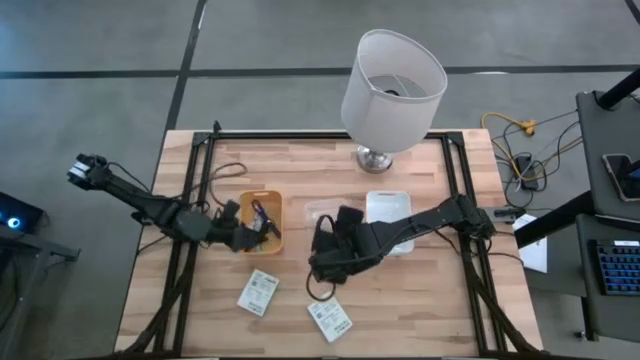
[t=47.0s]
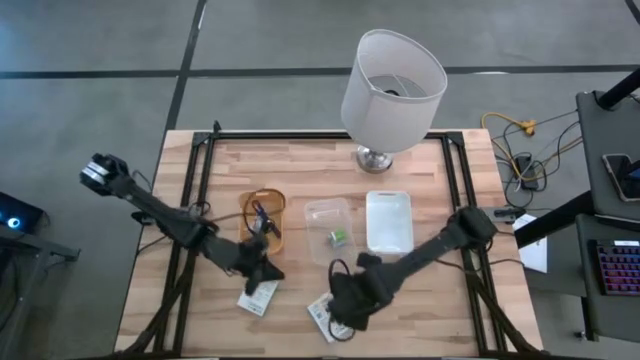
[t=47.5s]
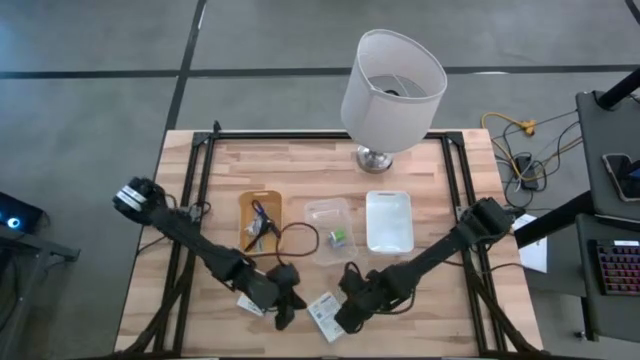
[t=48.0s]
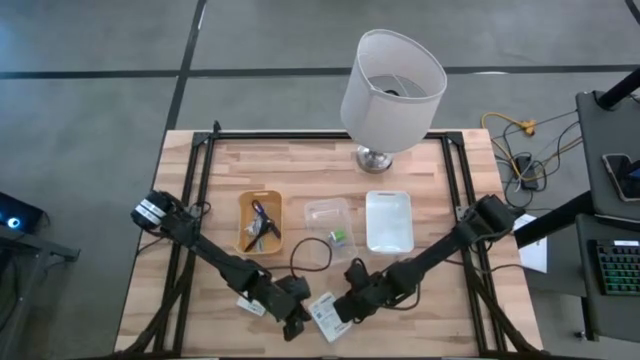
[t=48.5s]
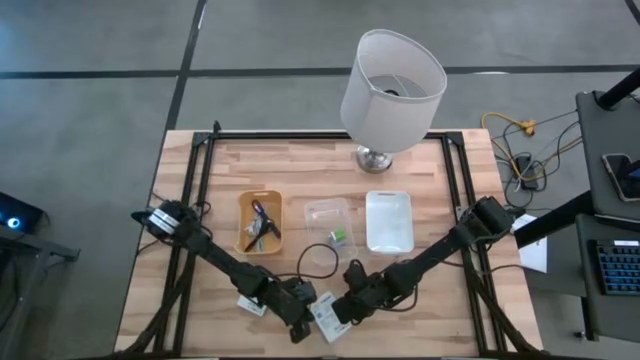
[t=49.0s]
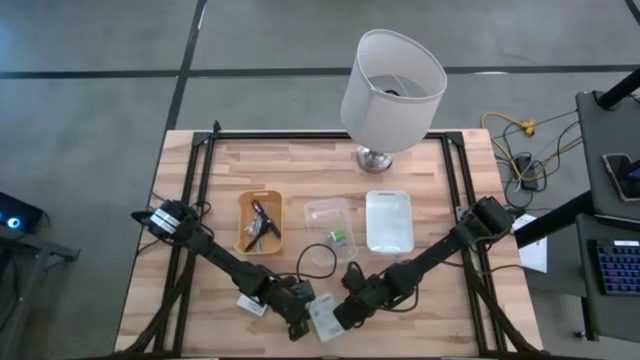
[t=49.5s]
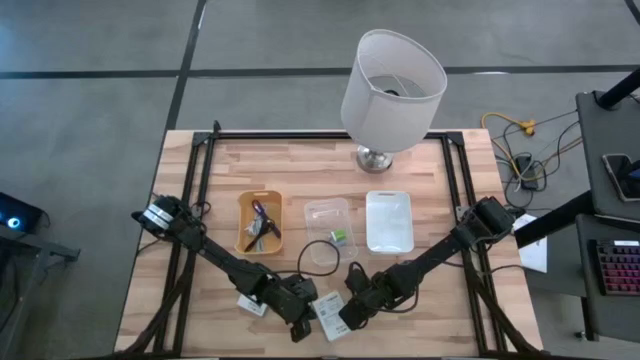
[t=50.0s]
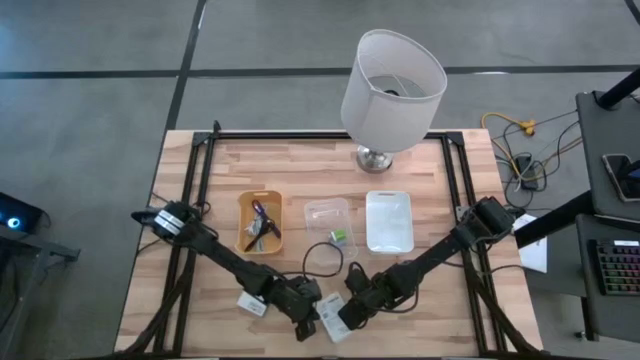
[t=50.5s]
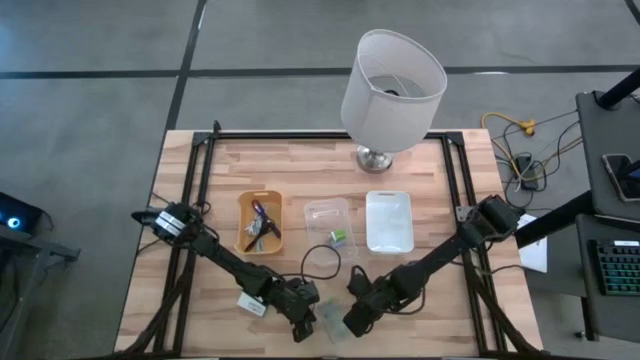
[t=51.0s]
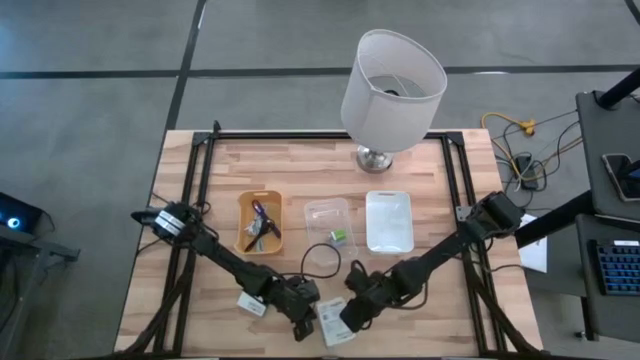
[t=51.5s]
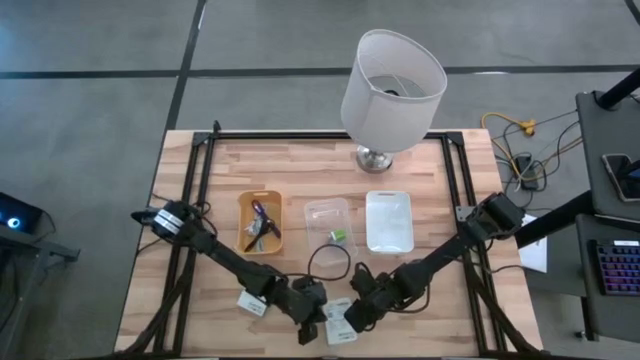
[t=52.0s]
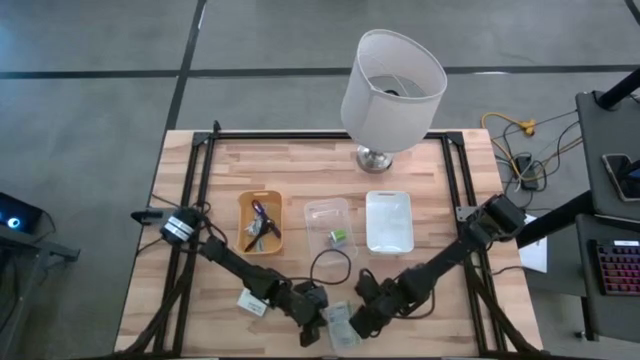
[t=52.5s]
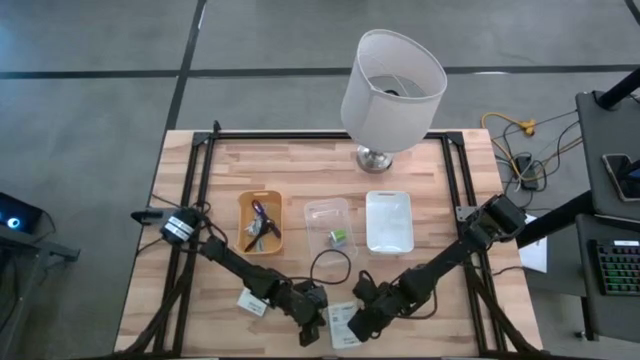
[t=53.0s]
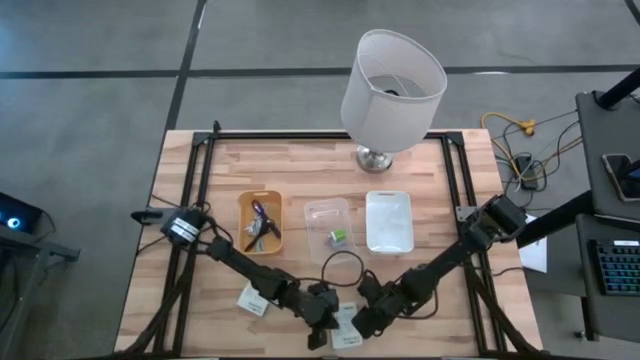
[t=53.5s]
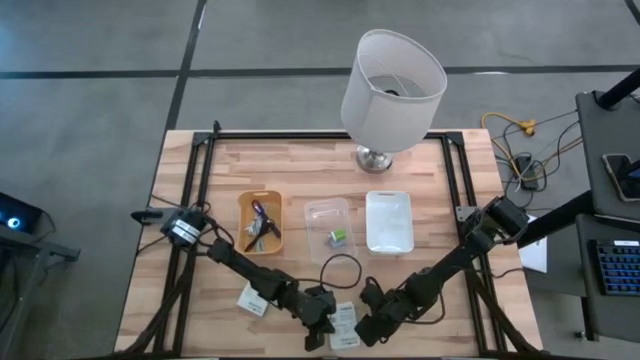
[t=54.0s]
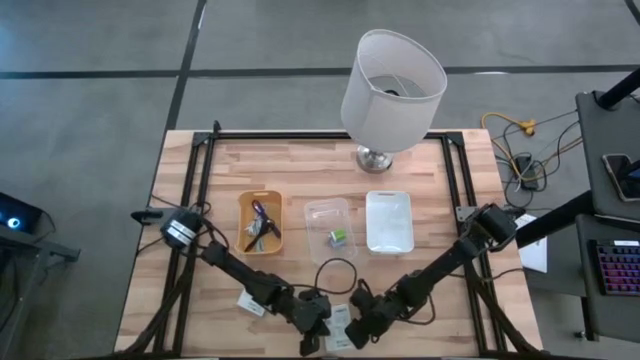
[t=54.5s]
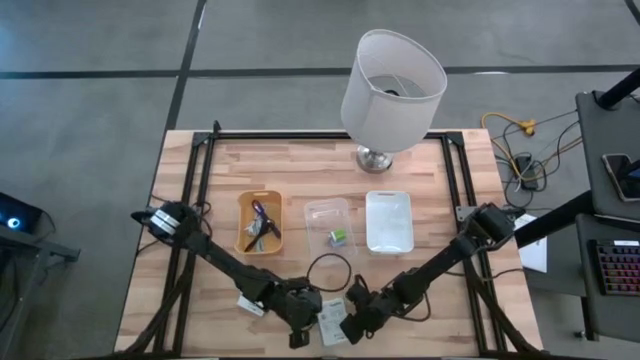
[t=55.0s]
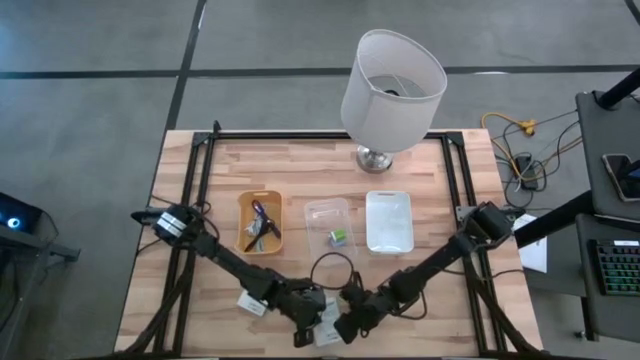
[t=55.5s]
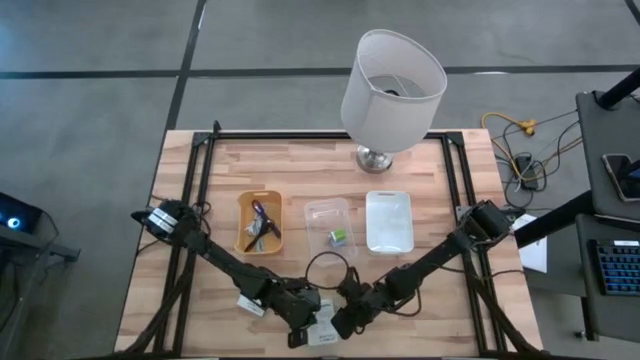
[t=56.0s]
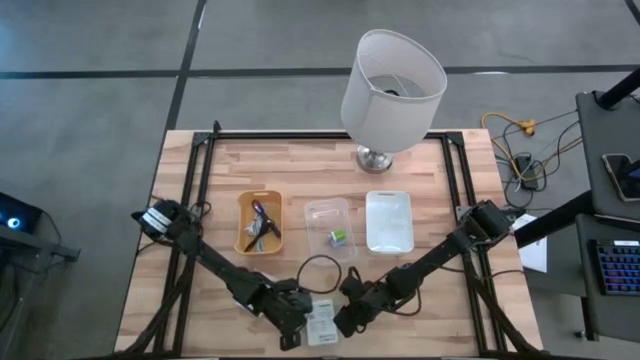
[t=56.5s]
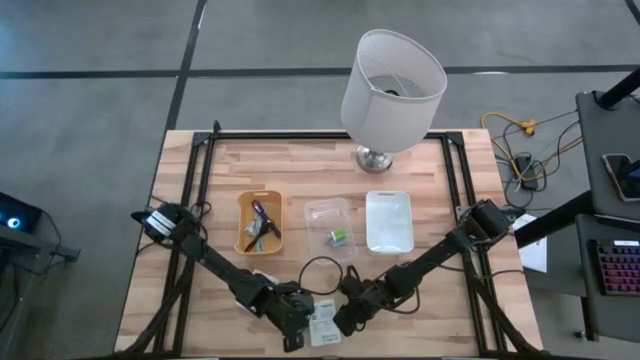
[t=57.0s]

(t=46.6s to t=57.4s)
Task: Pick and place items into bin
Put the right white card reader box into the white bin

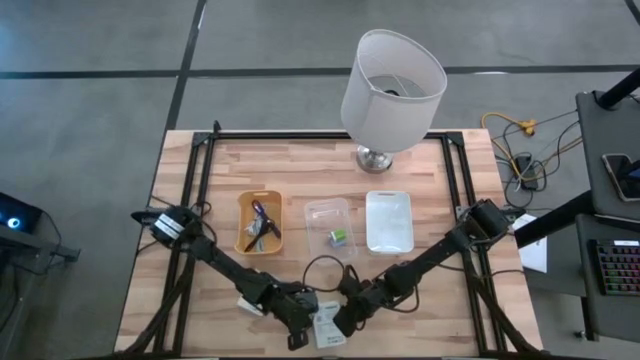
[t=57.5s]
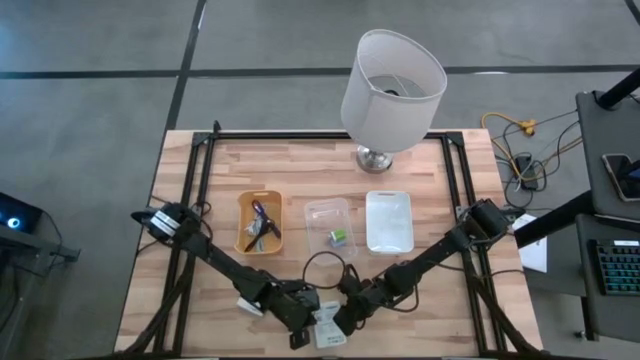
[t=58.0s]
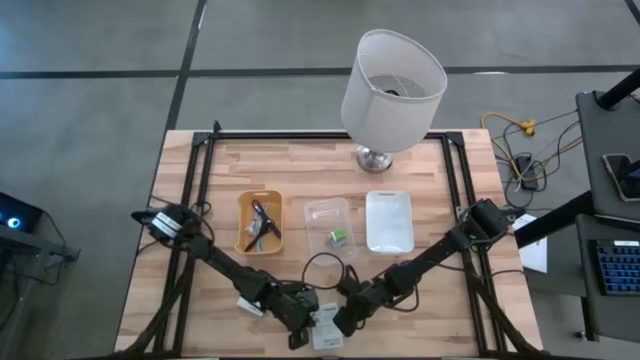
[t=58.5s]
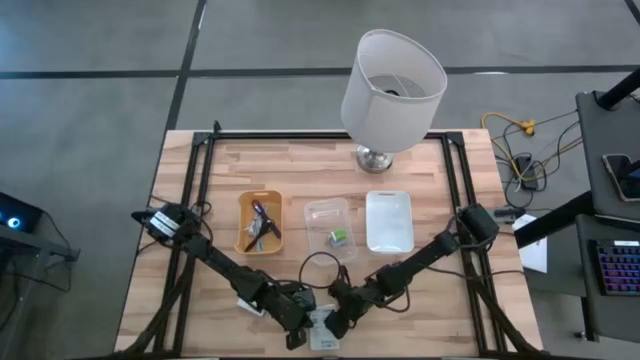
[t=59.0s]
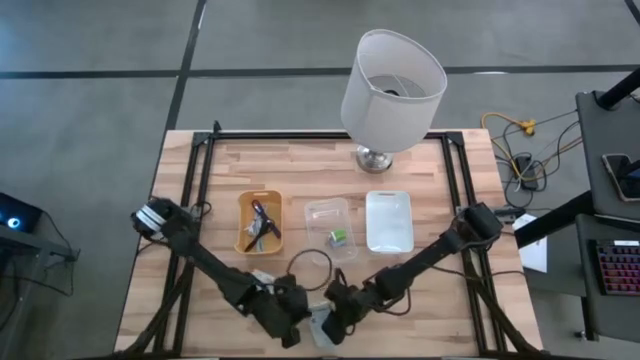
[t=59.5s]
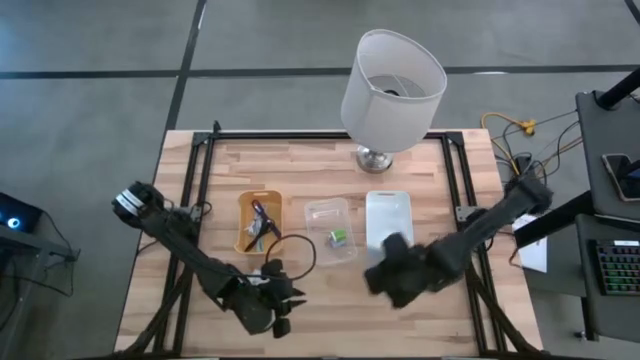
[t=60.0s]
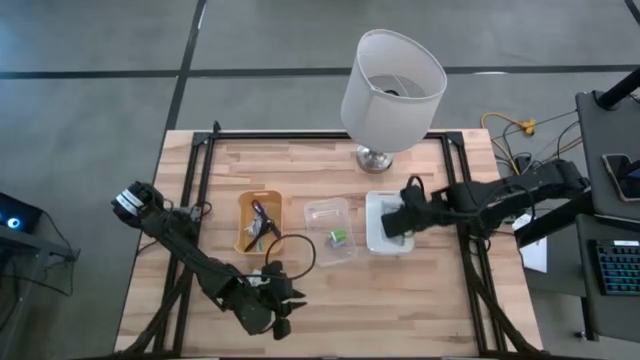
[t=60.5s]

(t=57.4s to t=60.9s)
Put the right white card reader box into the white bin

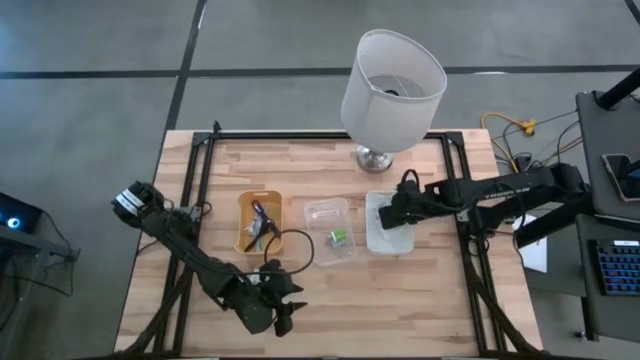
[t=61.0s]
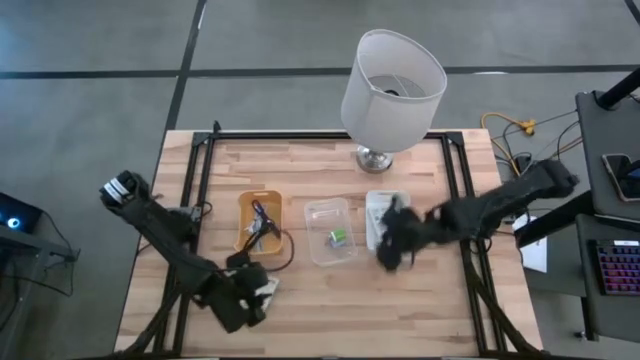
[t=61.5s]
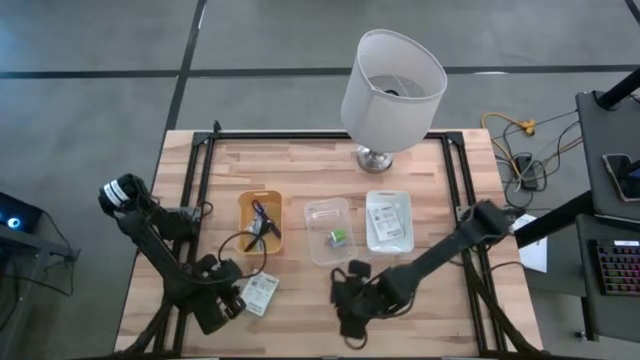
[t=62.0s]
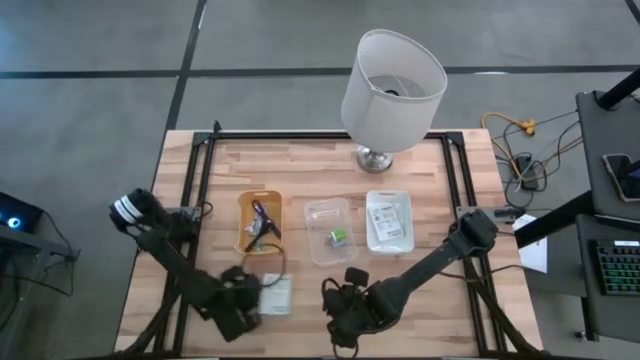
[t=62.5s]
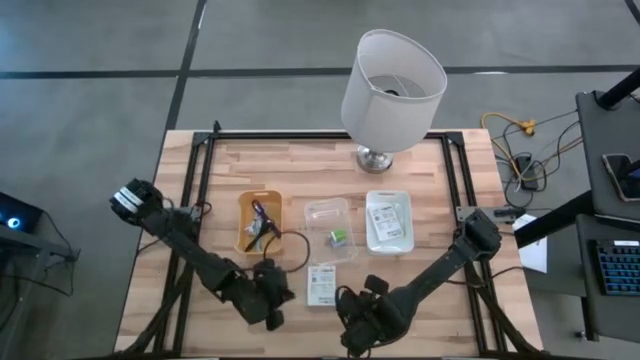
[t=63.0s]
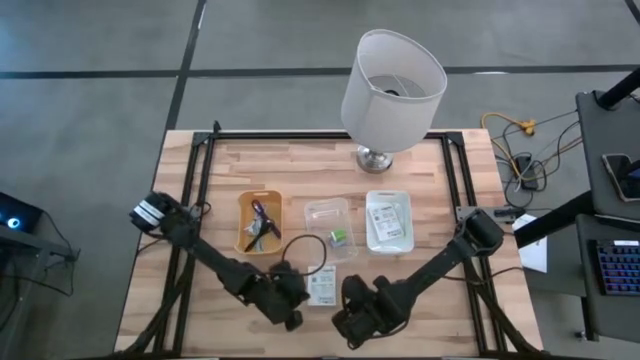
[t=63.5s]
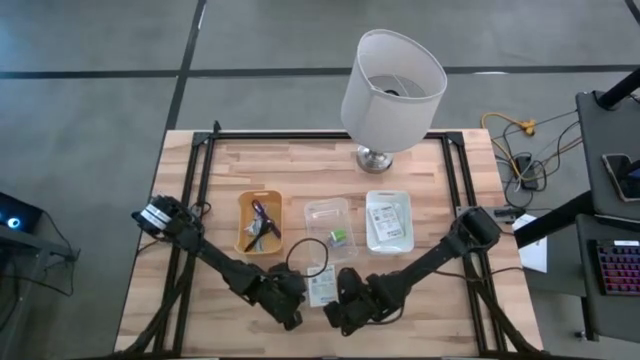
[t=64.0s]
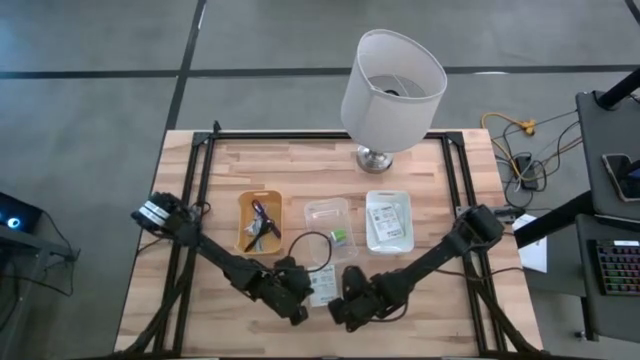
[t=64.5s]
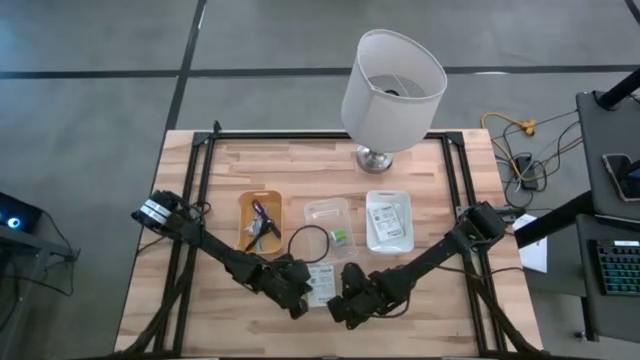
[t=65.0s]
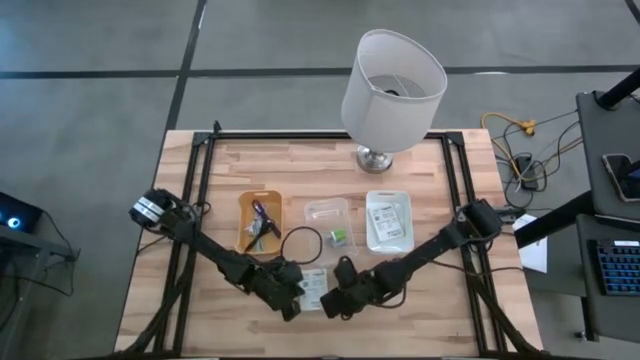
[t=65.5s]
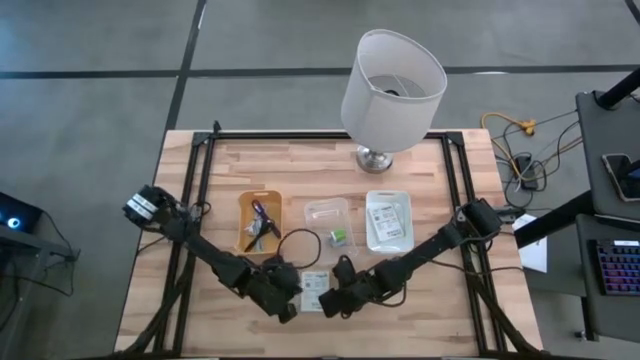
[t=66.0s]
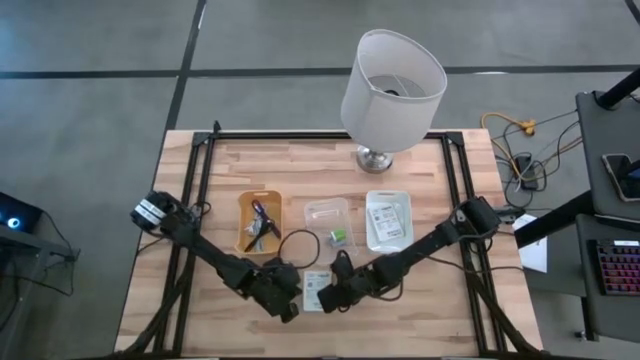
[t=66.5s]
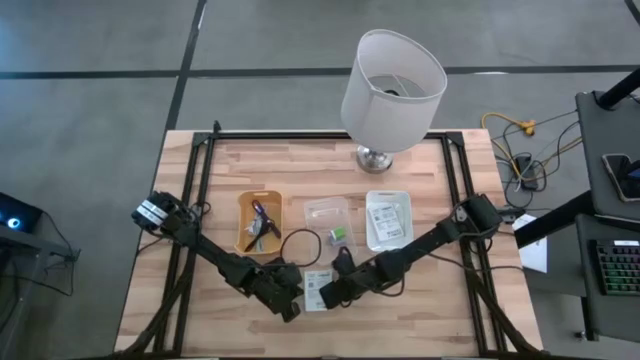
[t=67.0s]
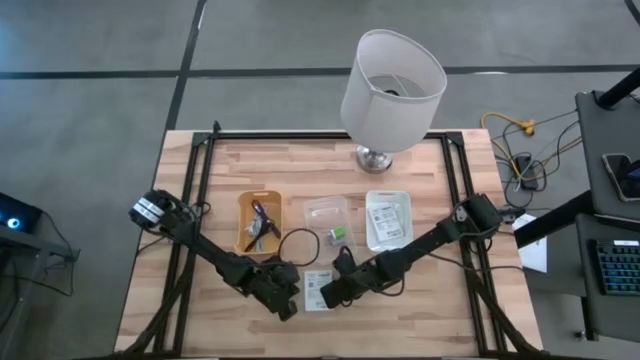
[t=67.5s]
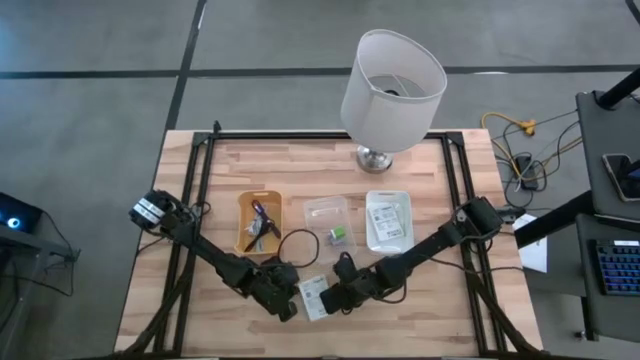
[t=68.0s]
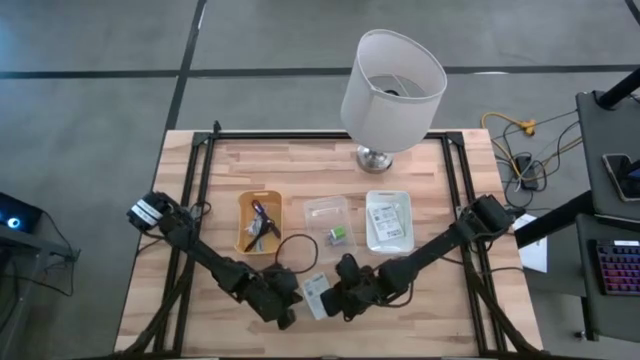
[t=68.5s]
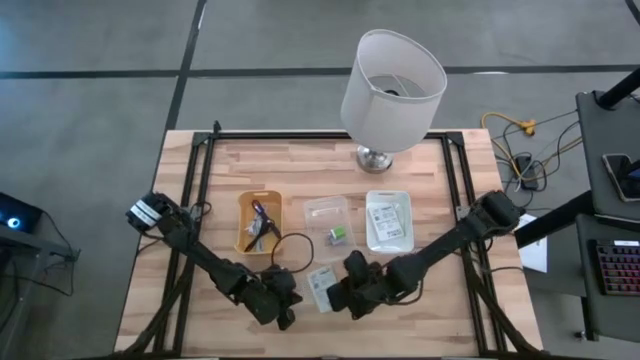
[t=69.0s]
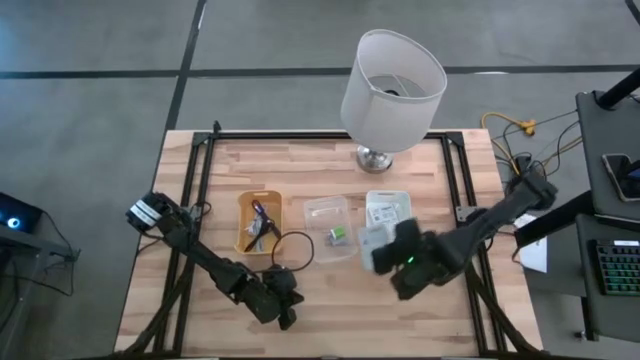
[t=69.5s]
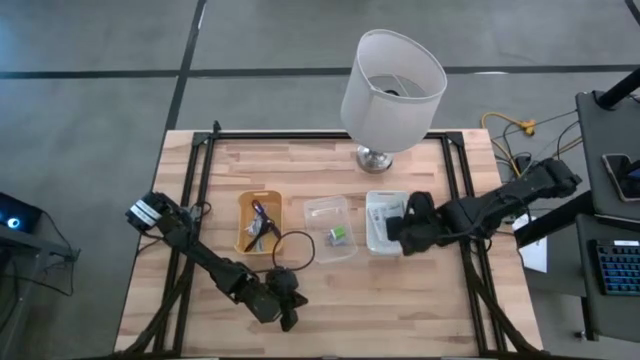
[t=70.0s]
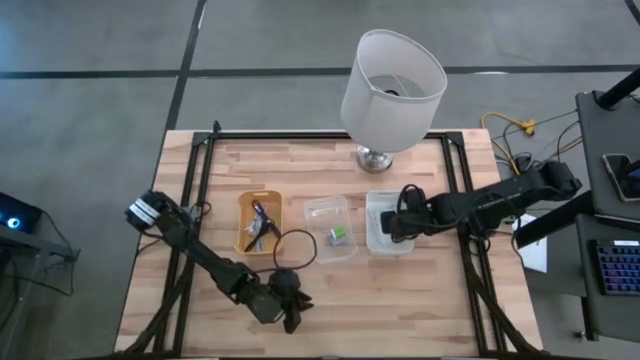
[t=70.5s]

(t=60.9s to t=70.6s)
Put the white card reader box into the white bin
